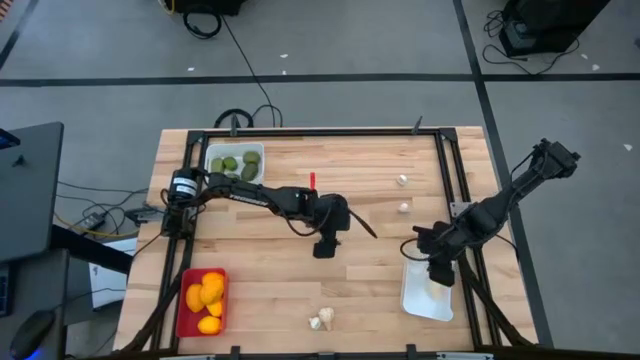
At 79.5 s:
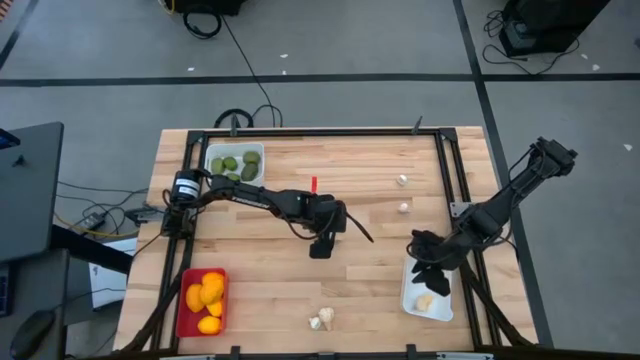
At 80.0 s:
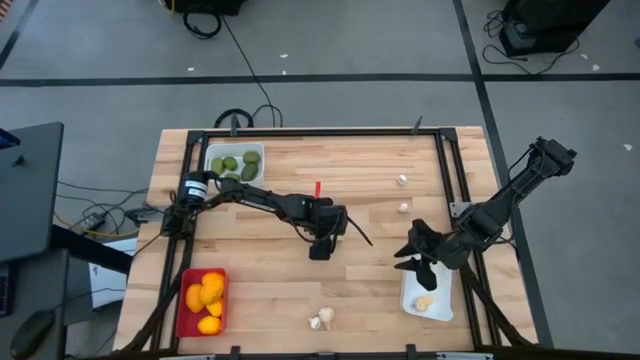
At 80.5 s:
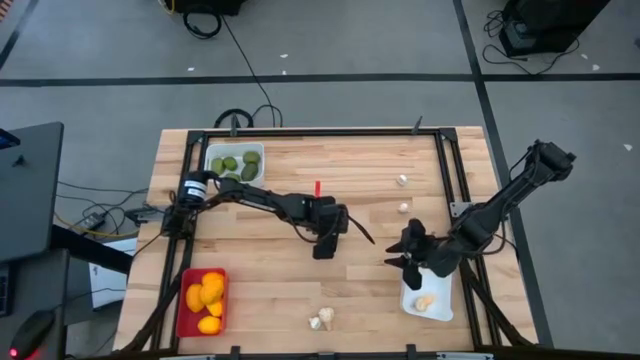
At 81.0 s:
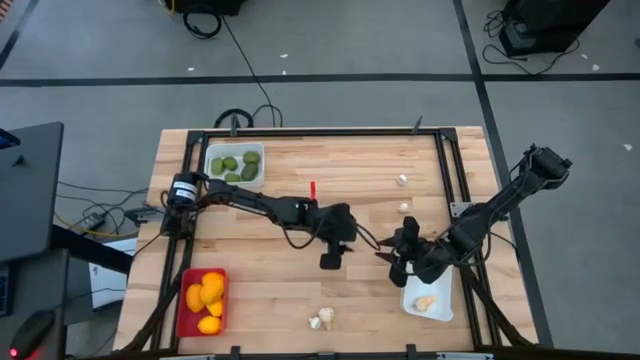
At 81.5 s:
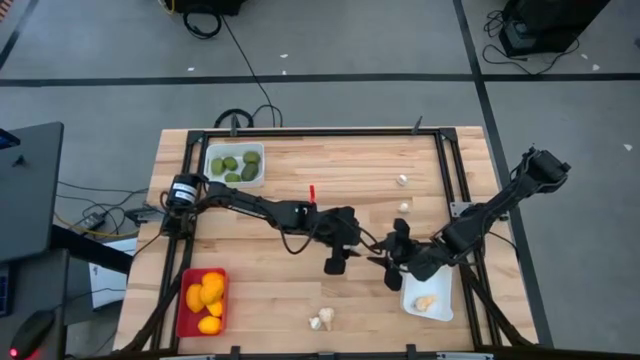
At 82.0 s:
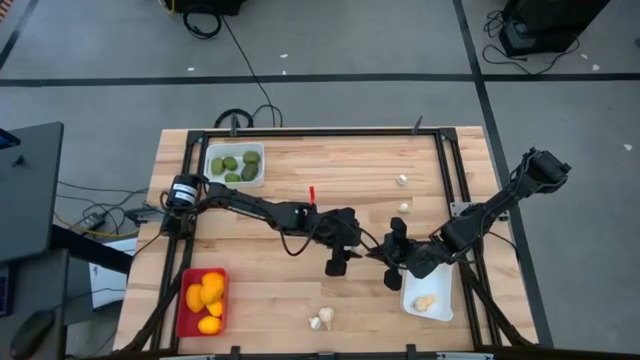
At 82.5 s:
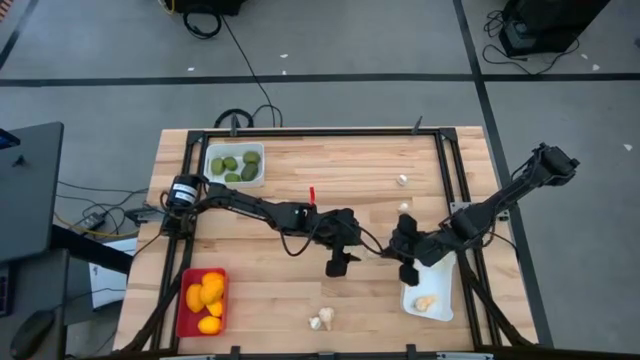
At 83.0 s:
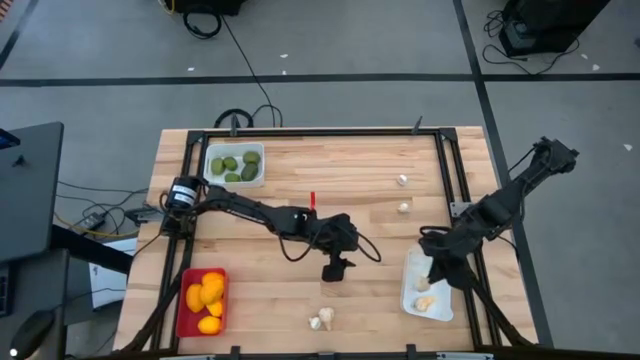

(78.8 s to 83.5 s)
Task: Sort produce into baskets
Put the top white small garlic into the bottom white bin

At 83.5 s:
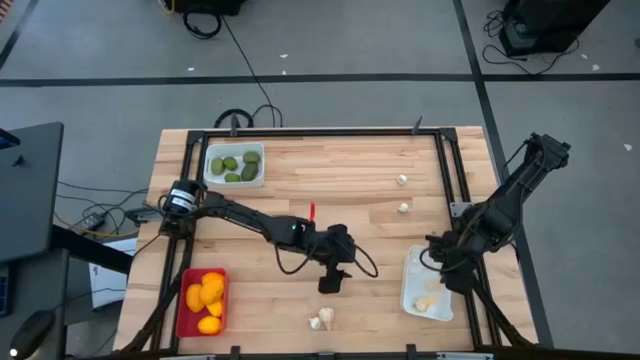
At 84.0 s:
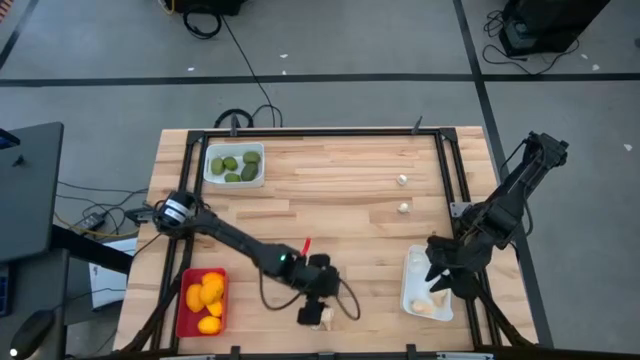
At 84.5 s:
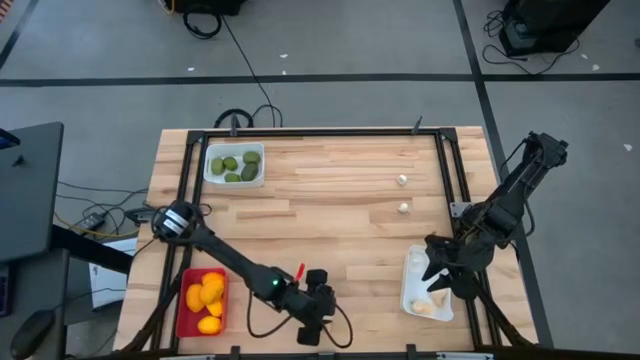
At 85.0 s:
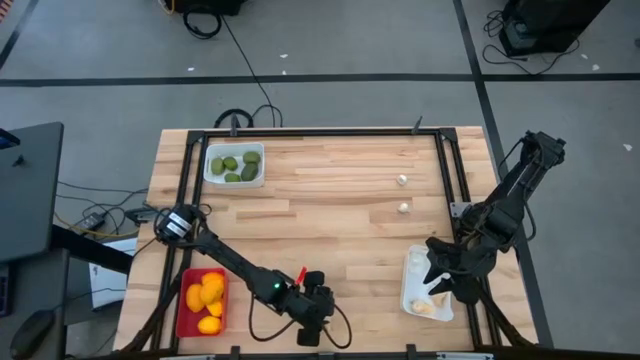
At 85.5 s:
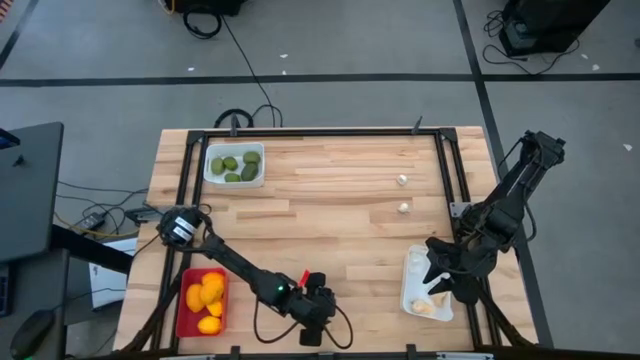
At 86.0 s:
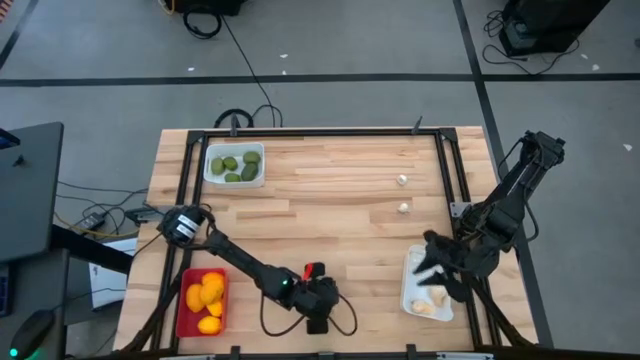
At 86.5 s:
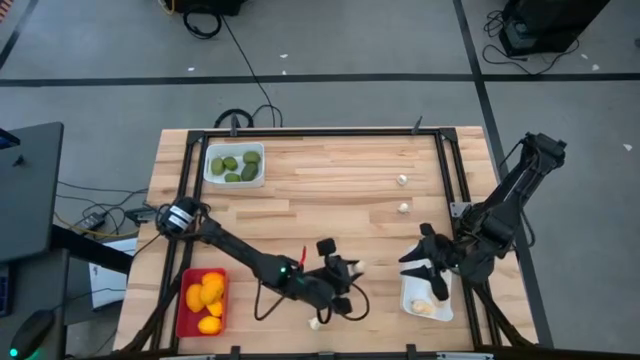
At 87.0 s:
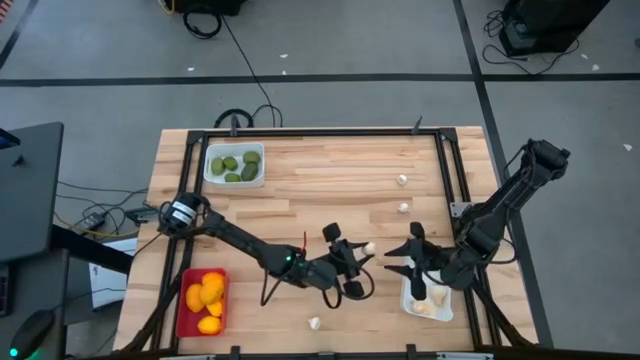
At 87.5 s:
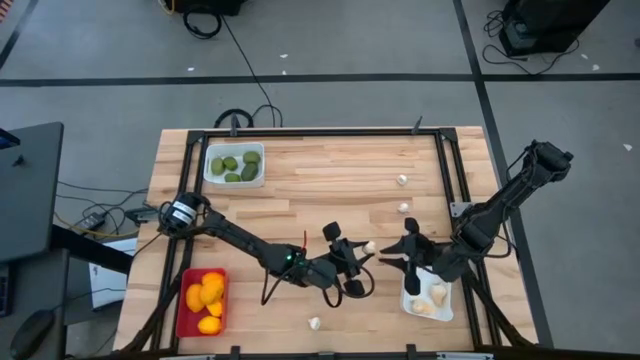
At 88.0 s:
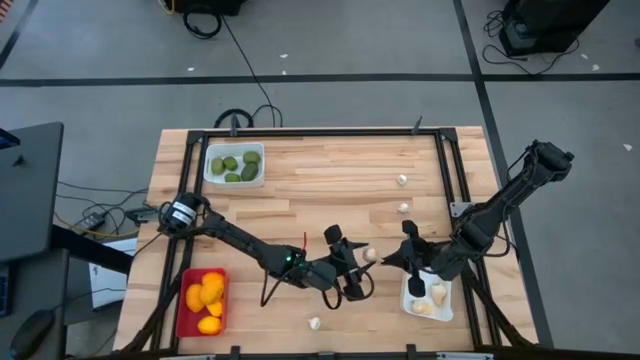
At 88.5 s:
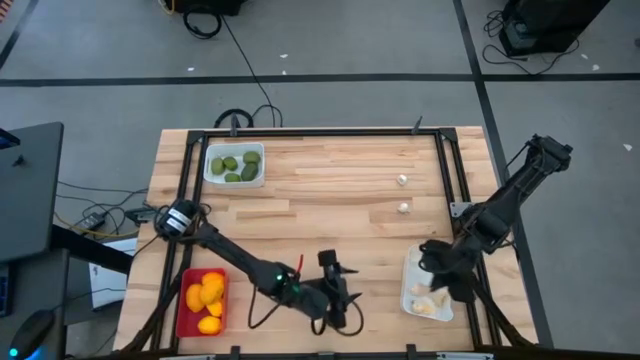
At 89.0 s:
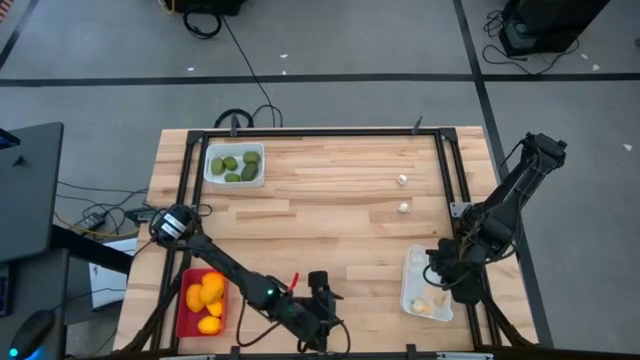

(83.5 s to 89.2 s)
Put the big white garlic into the bottom white bin

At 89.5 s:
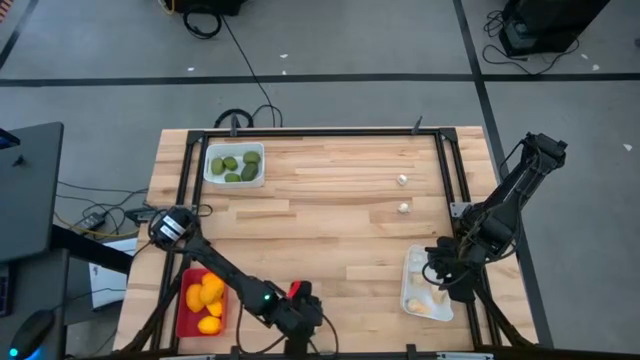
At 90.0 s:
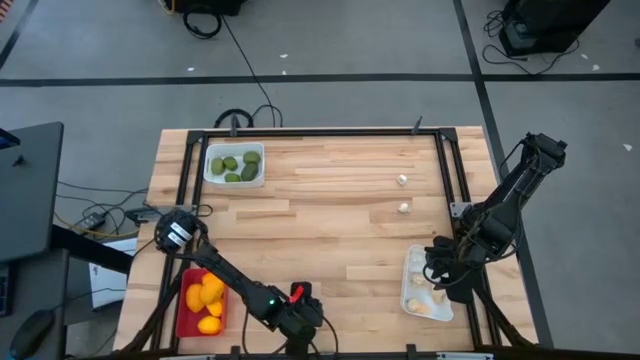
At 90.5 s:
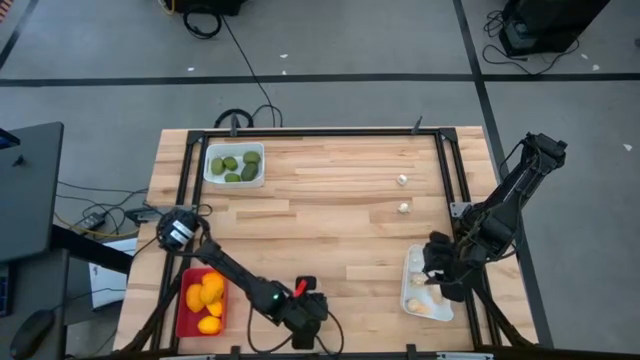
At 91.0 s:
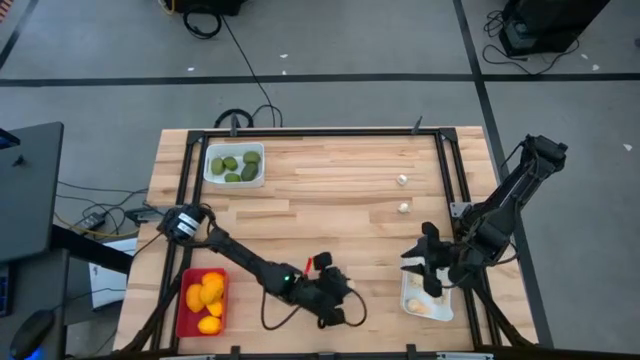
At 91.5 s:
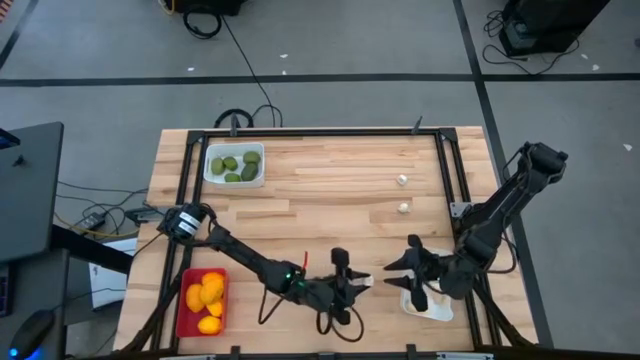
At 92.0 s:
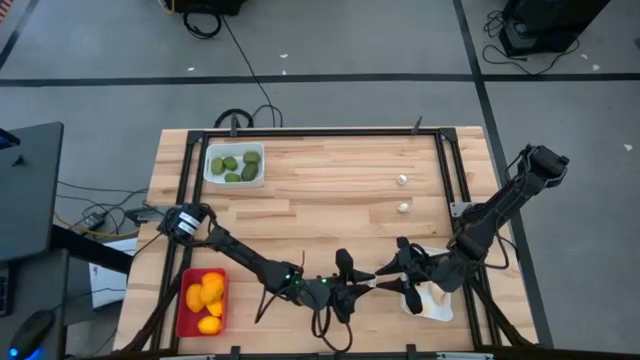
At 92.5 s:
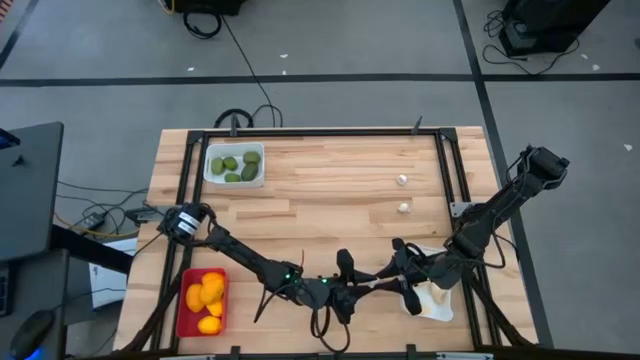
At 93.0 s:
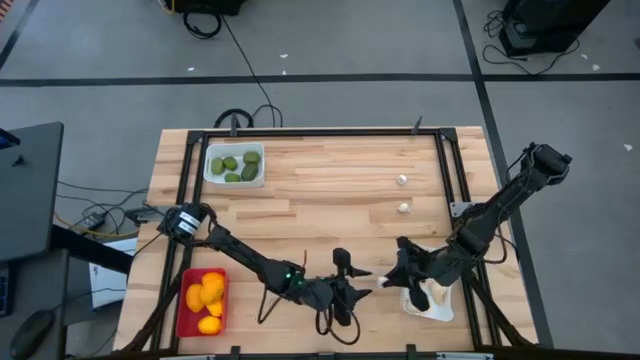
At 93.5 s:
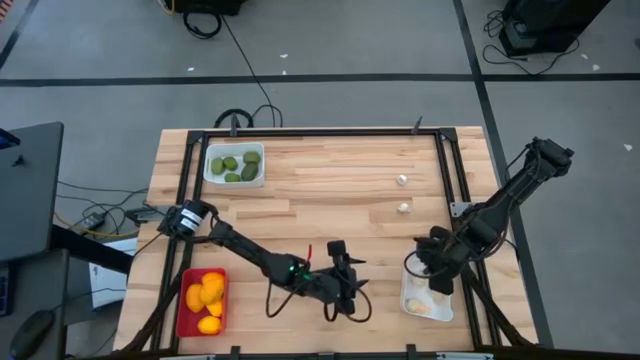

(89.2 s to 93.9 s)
Put the bottom small white garlic into the bottom white bin

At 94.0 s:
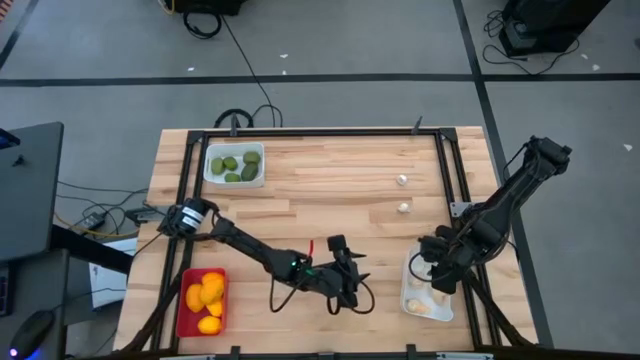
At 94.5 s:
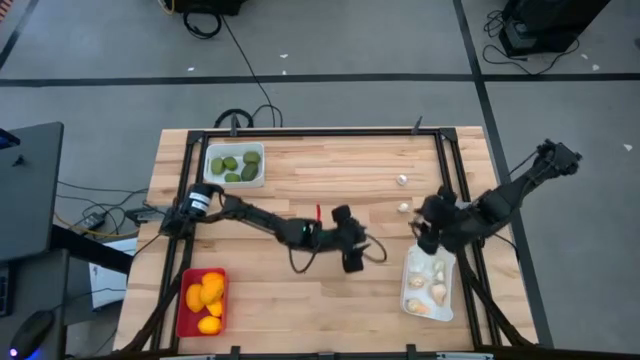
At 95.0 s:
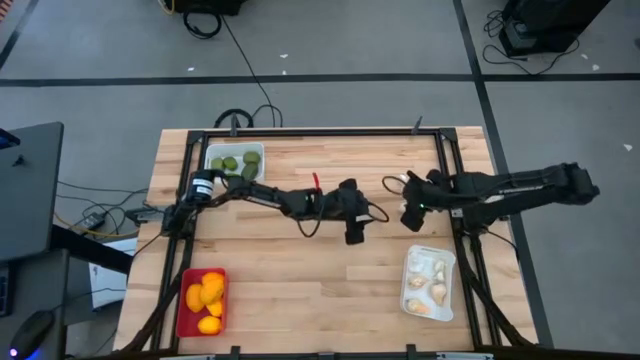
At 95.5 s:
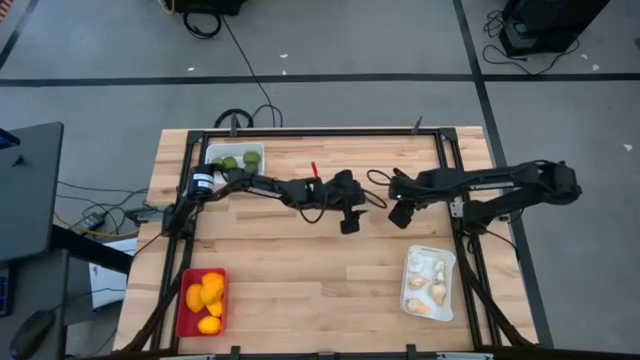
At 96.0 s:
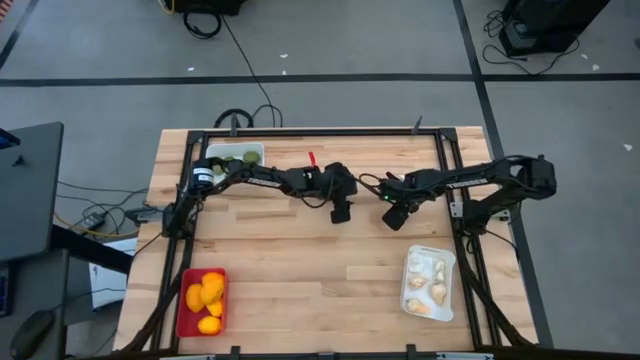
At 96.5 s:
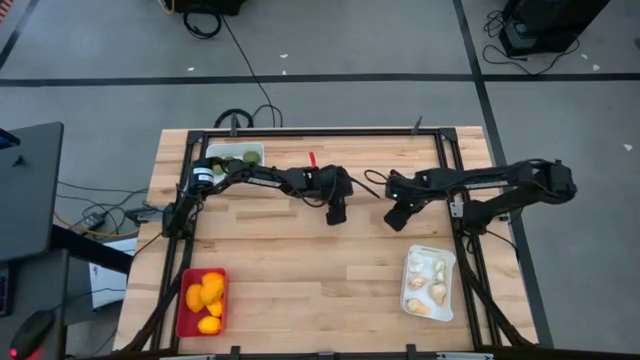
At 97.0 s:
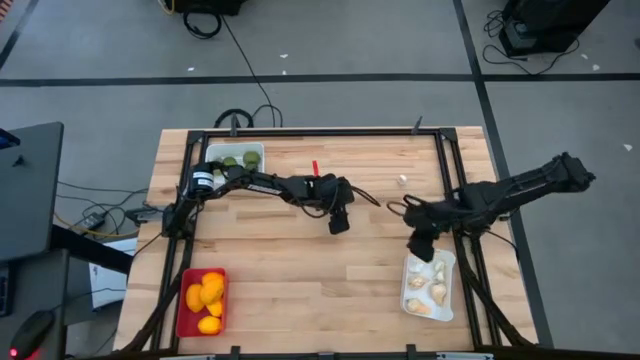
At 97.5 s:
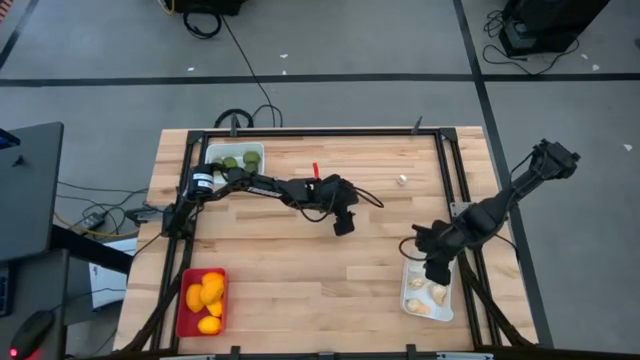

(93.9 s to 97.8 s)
Put the bottom small white garlic into the bottom white bin

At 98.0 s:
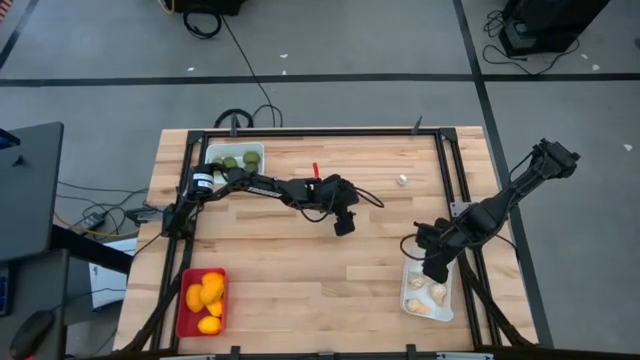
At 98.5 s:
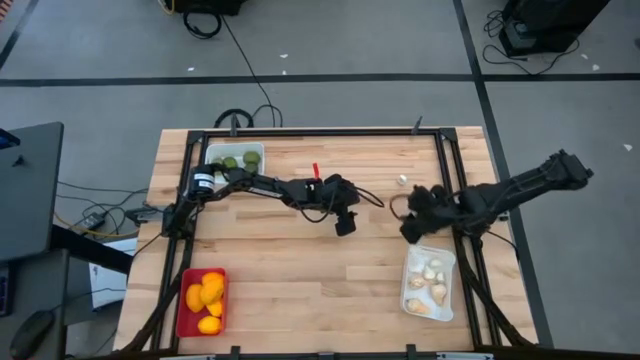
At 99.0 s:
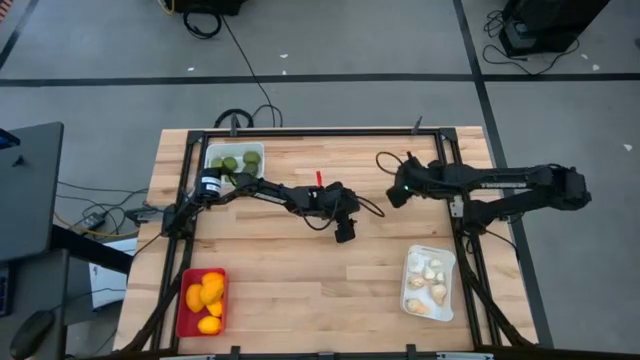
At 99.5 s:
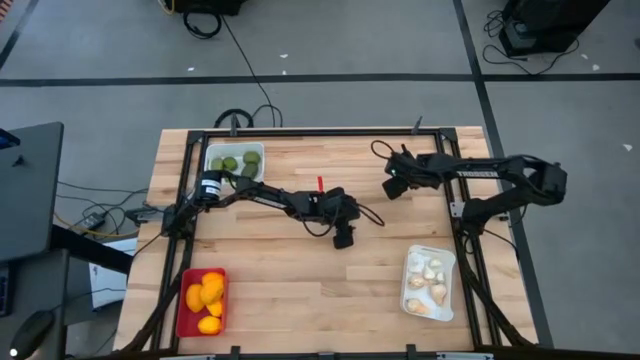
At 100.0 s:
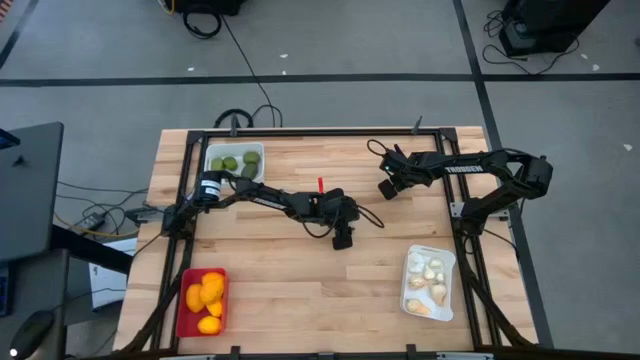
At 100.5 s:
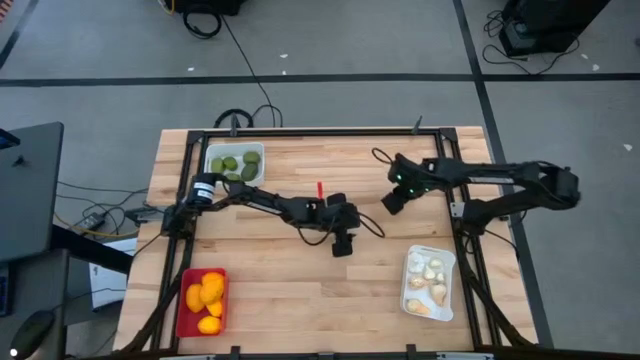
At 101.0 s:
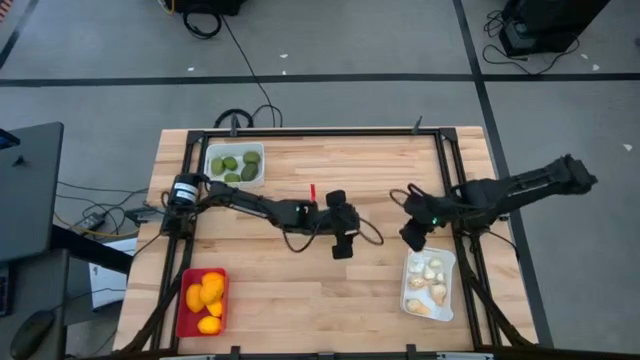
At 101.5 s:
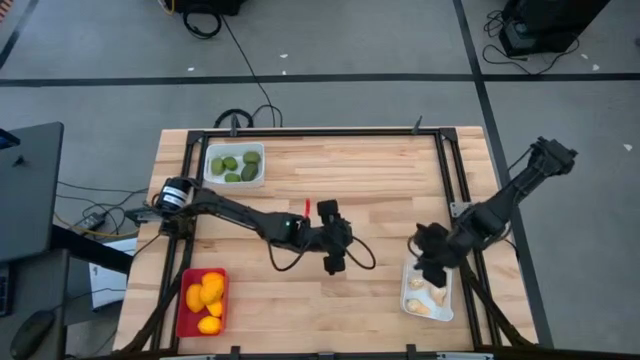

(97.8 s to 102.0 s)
Put the white garlic into the bottom white bin
